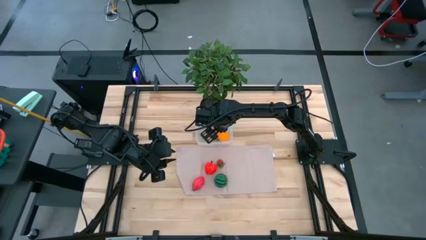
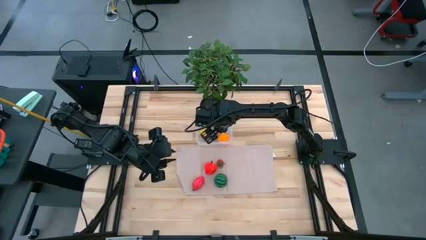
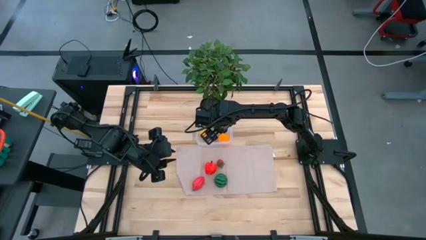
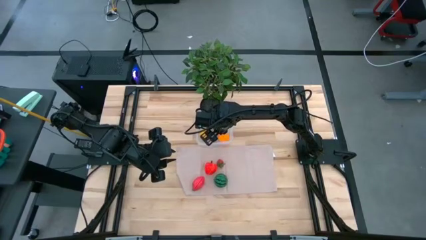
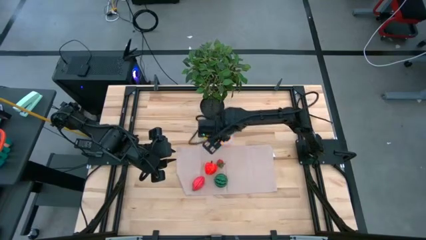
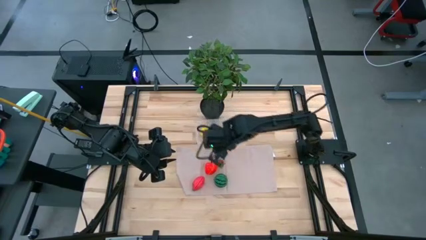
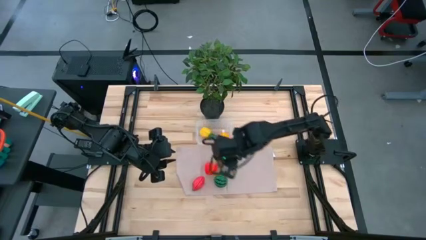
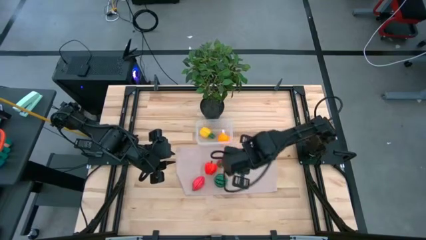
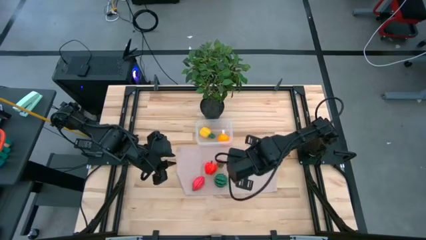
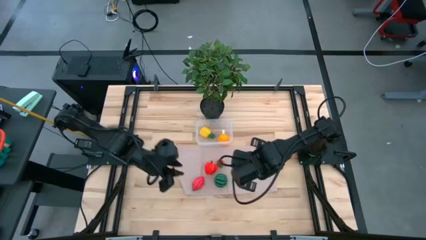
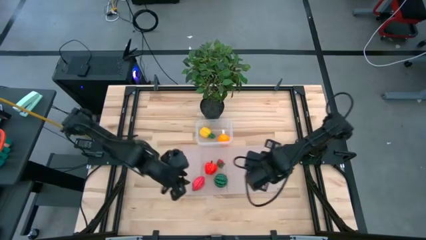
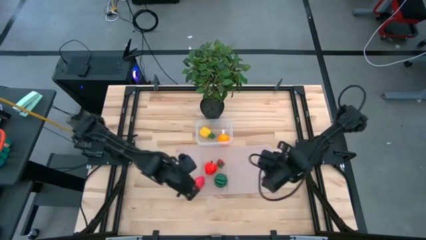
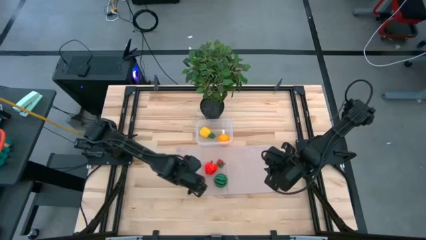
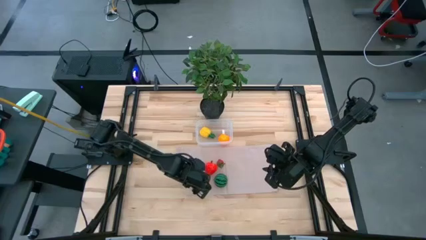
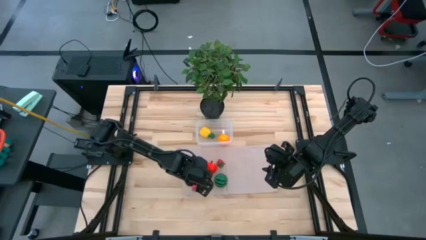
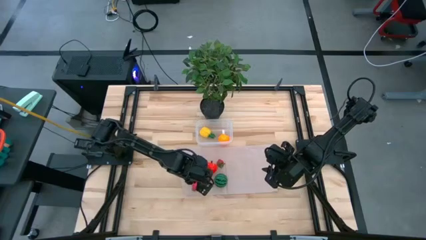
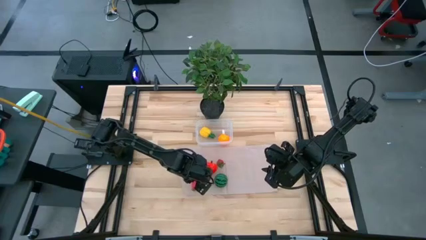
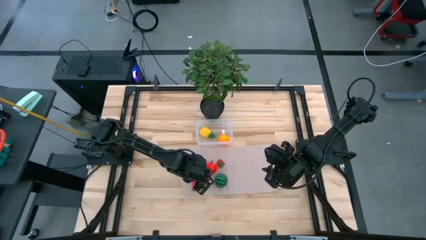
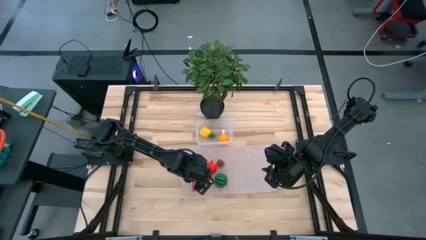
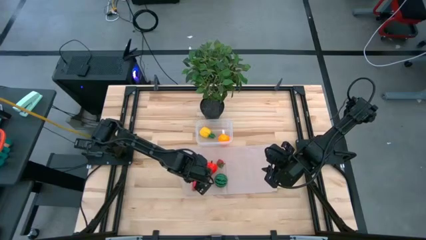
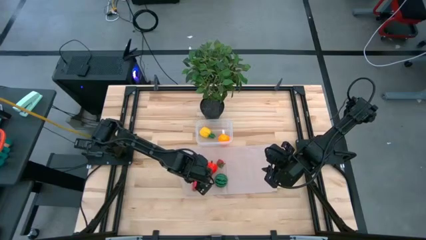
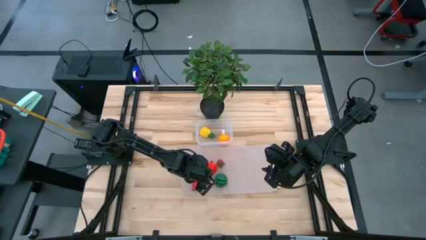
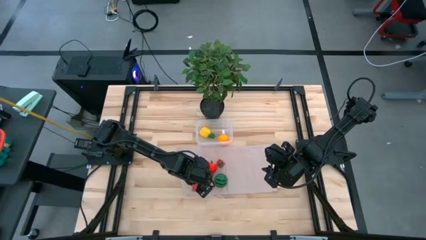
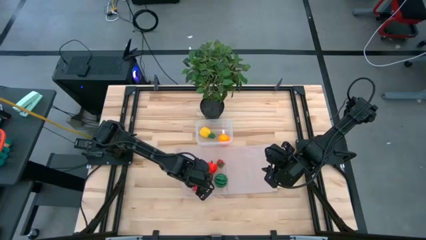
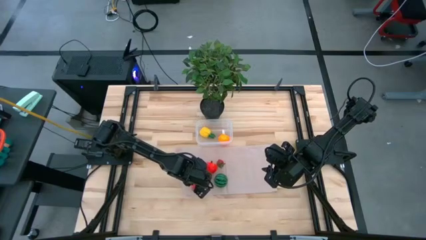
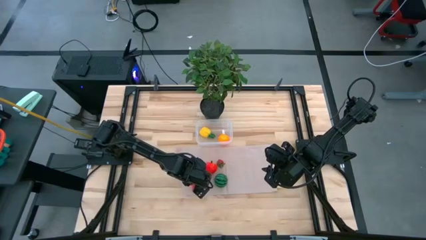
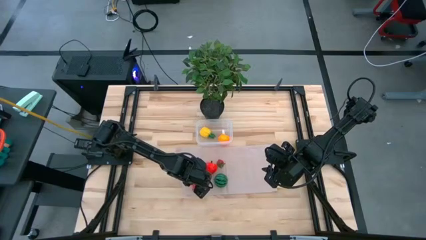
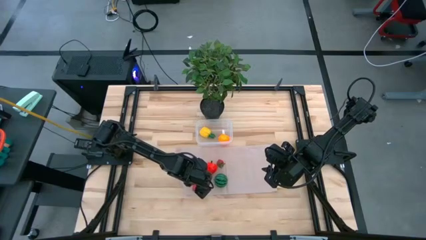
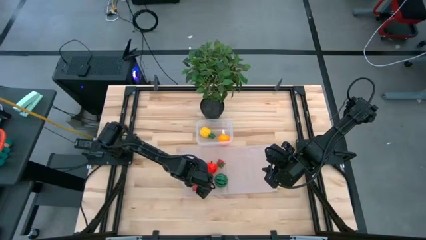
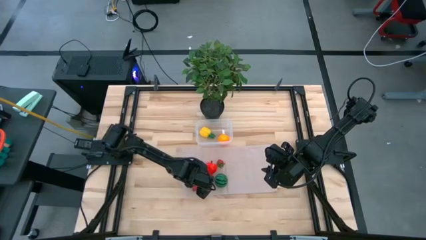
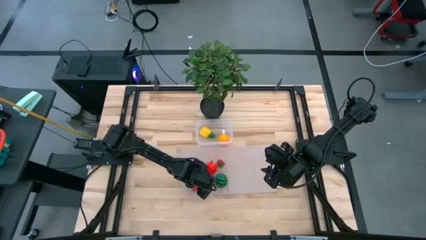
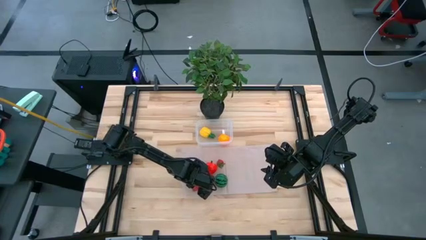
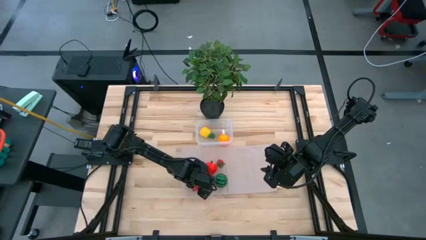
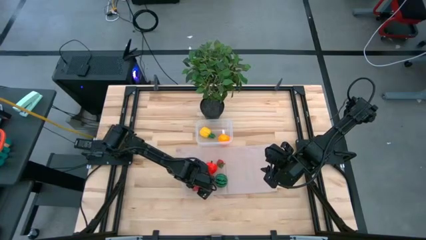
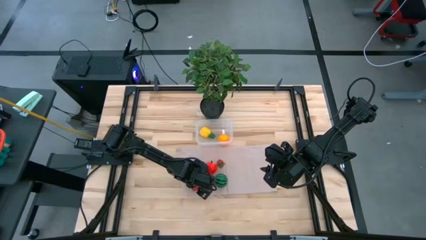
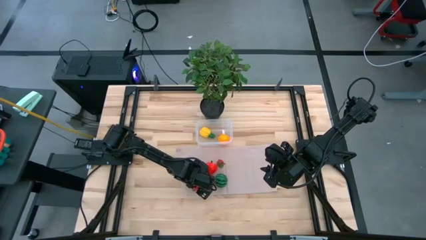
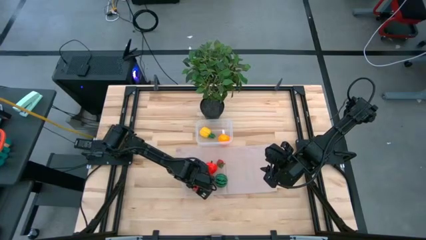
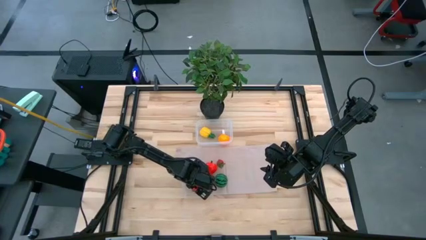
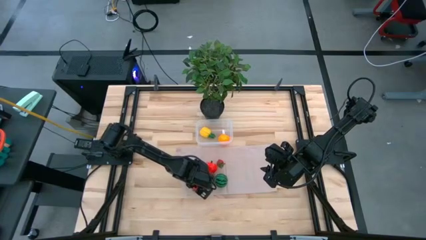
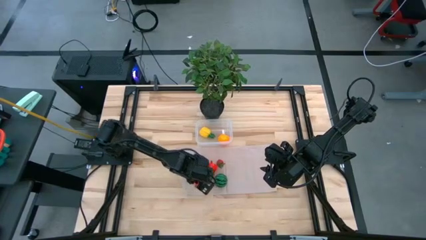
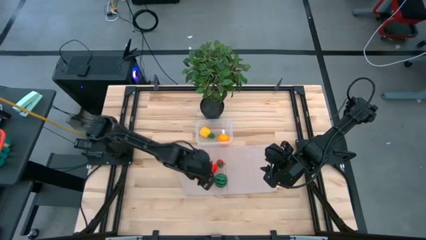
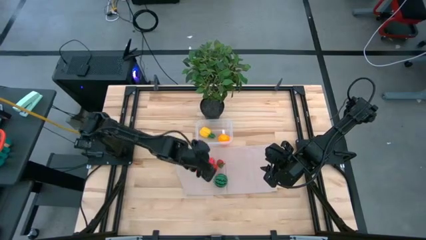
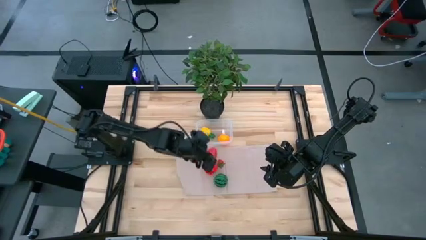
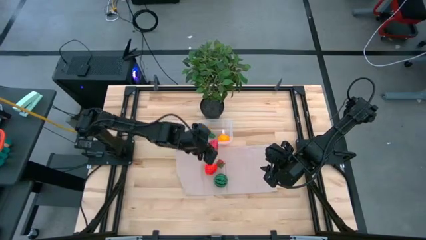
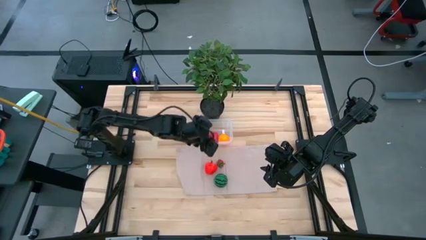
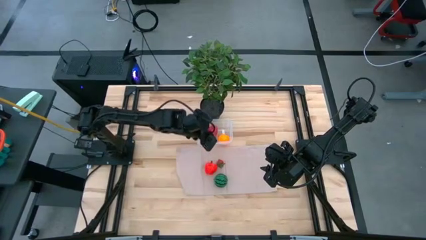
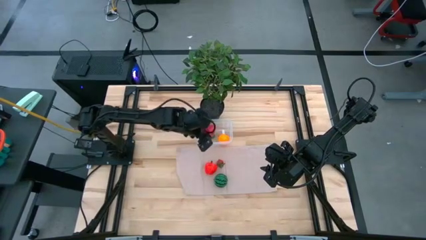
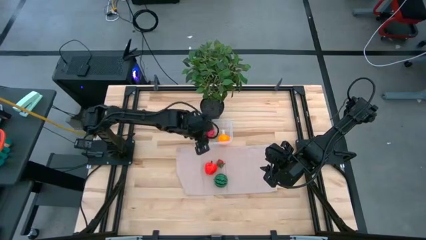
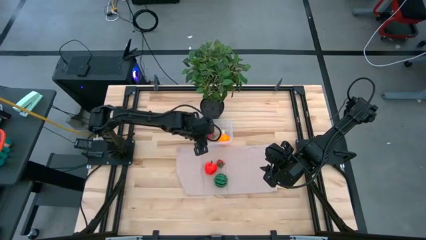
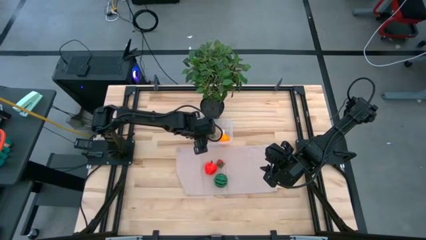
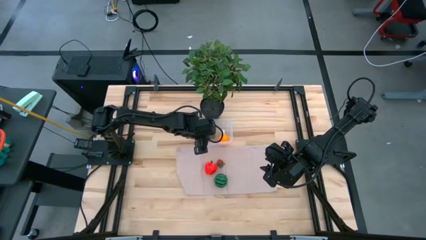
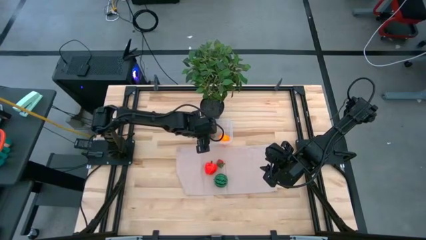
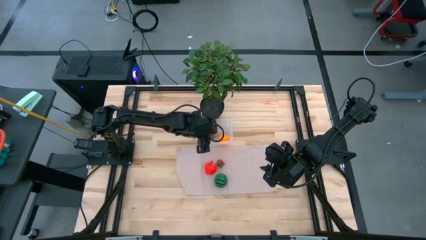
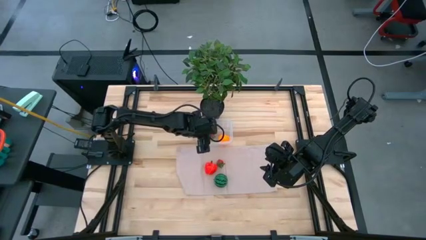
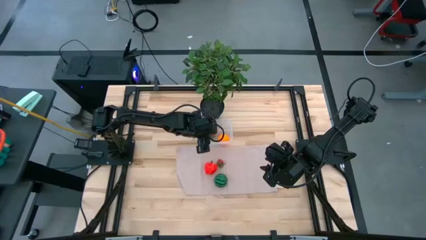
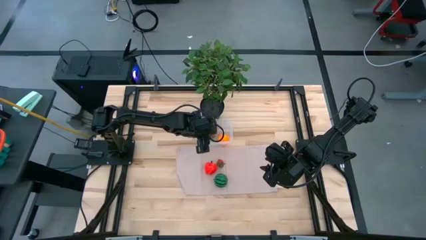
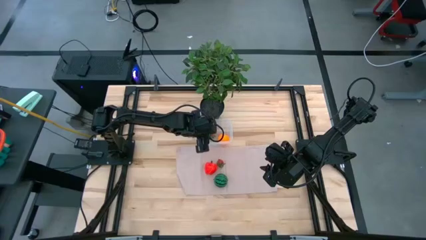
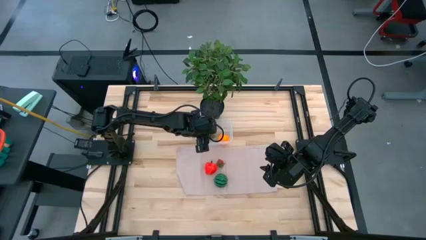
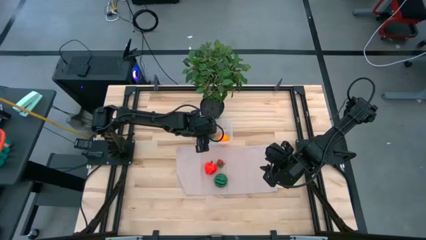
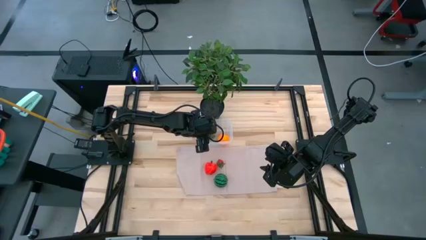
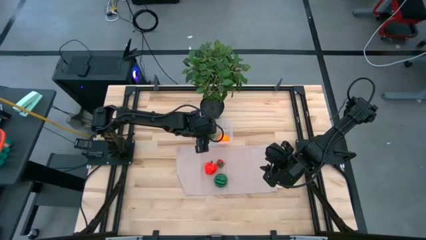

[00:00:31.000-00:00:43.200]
Task: Pick and placing Produce into tupperware
Put the dragonfruit into the transparent bin
